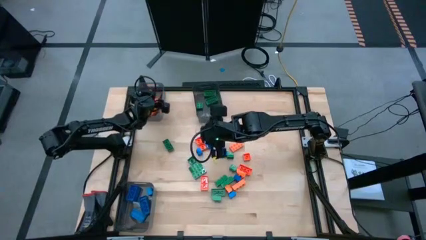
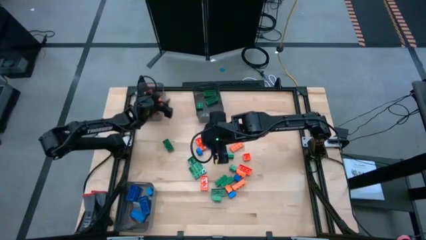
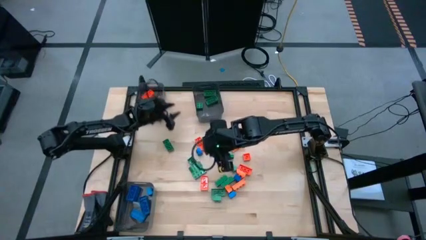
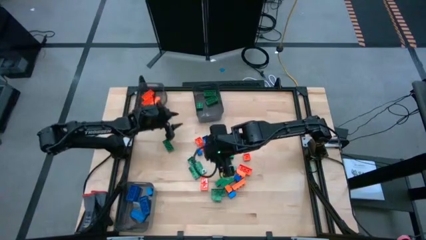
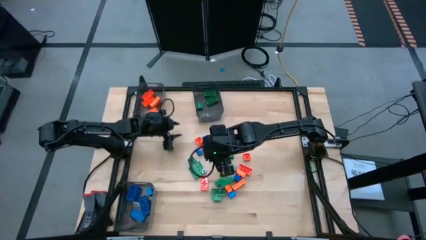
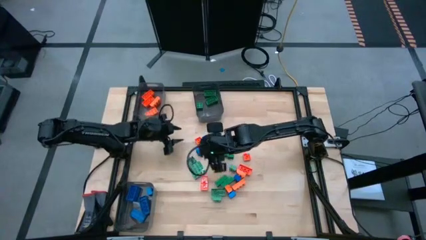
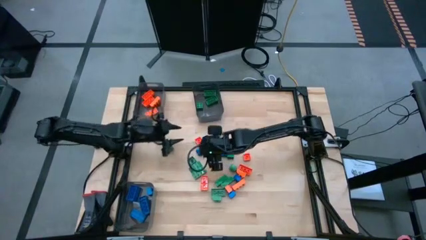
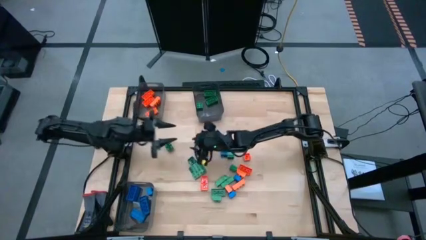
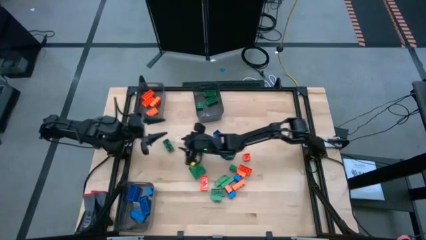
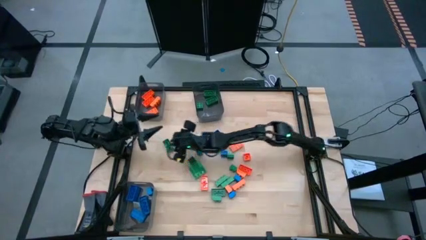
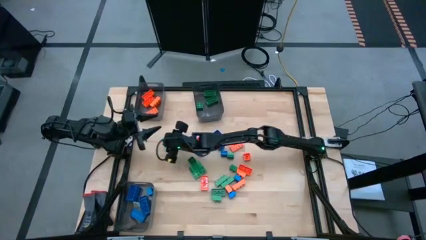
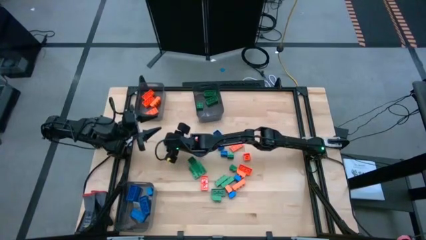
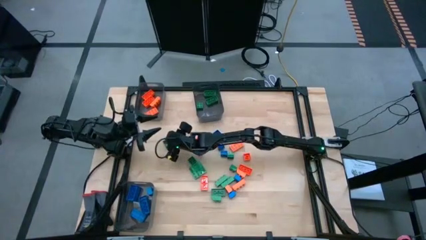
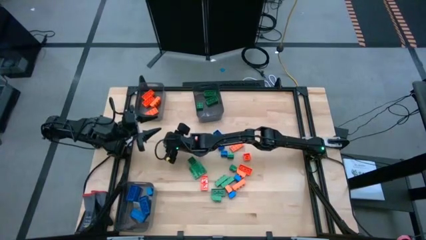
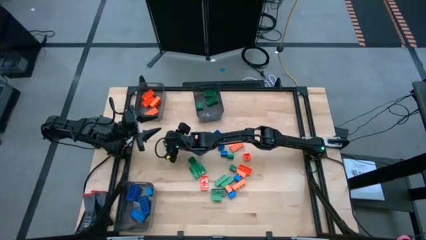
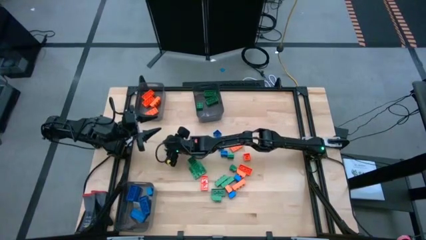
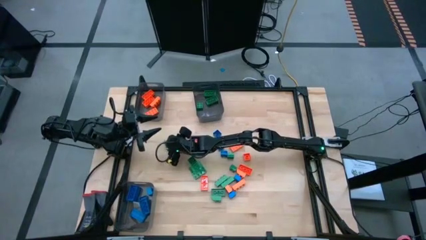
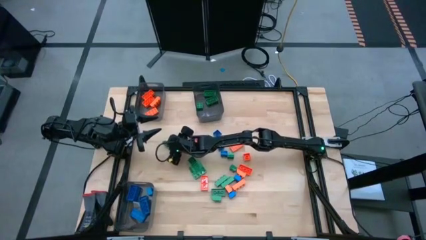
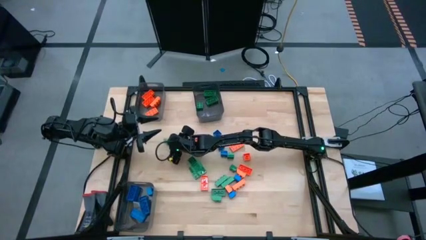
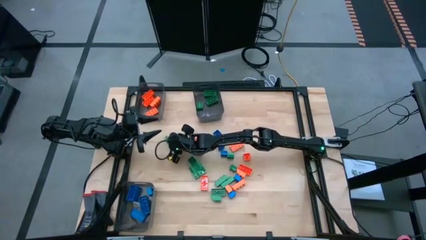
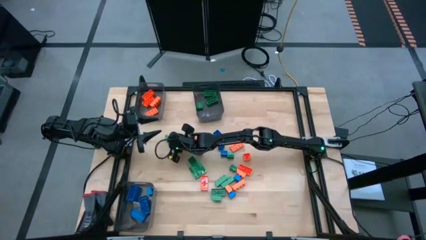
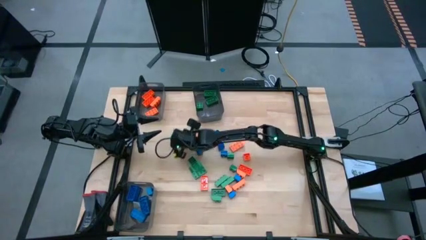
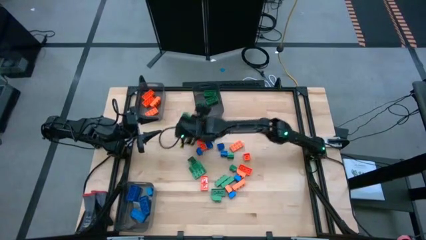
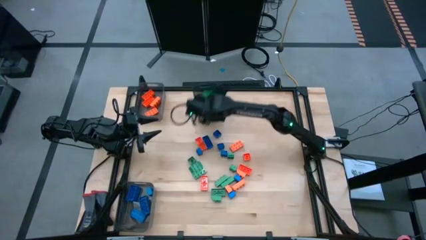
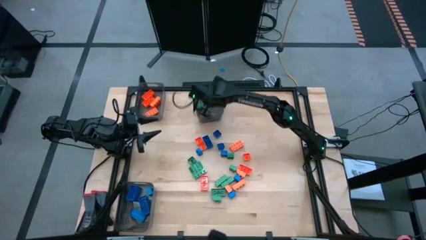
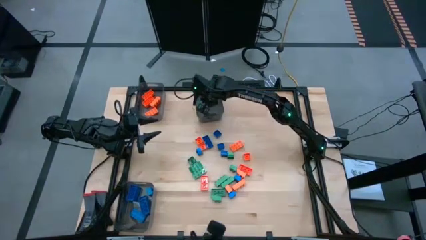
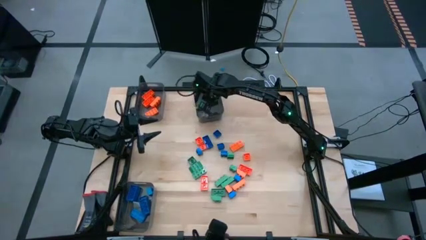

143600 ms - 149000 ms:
Task: Sort blocks
Put the green game piece into the top right black transparent bin

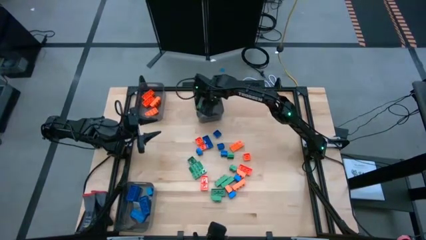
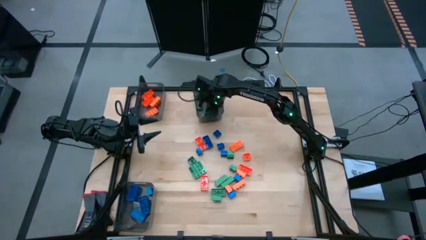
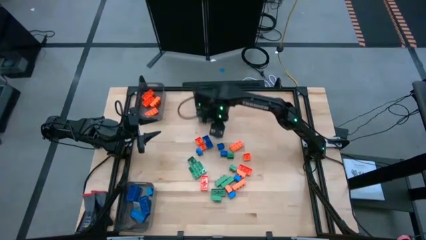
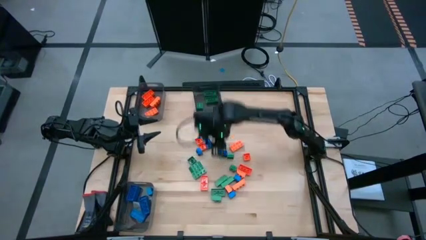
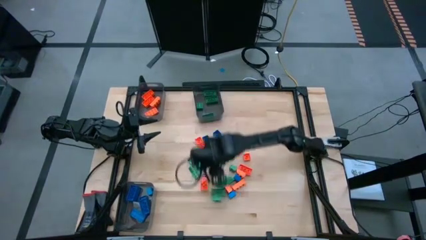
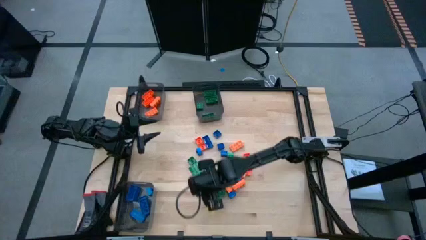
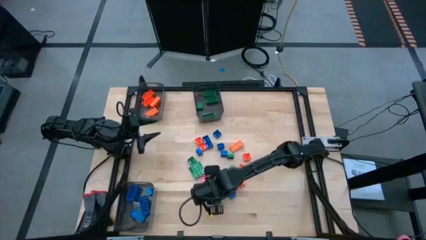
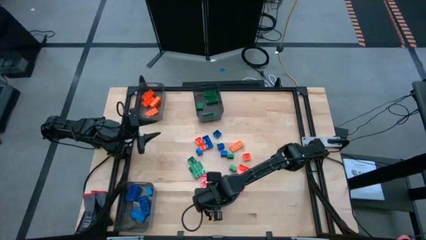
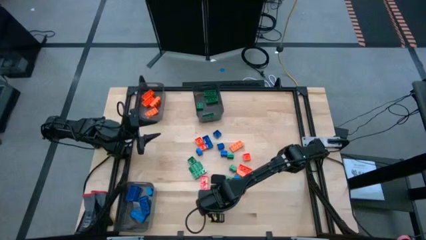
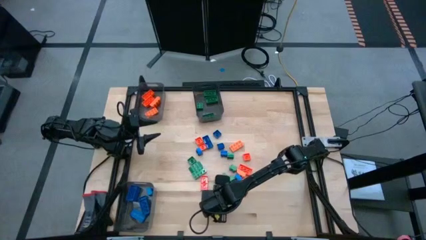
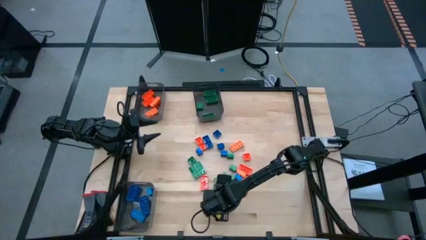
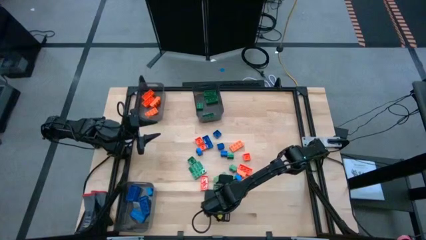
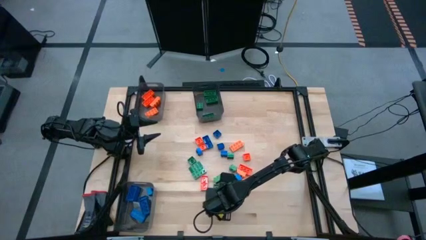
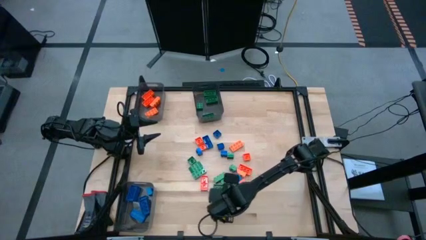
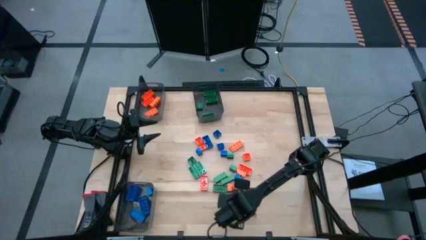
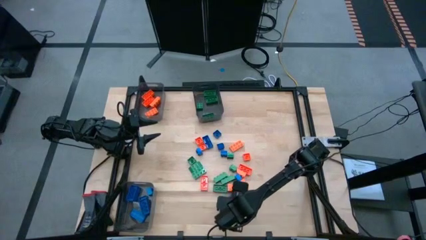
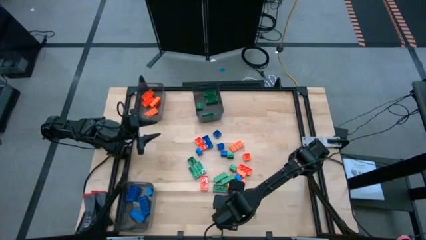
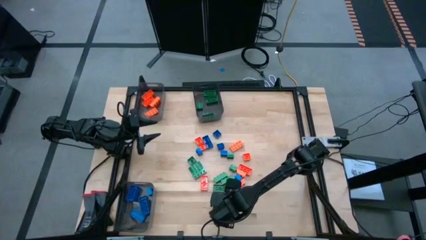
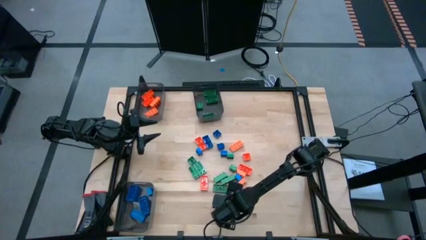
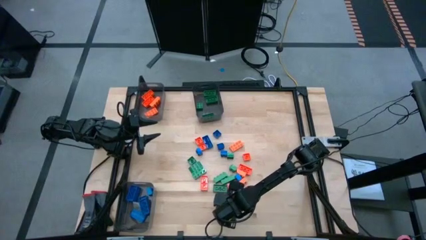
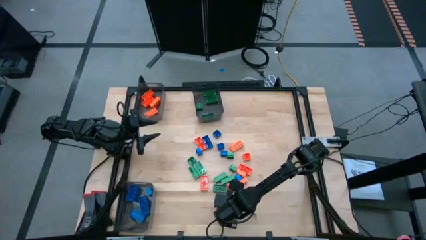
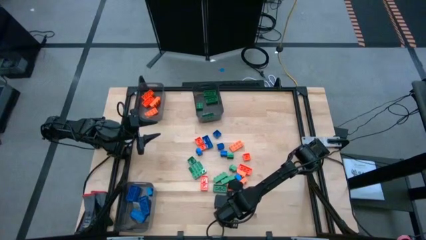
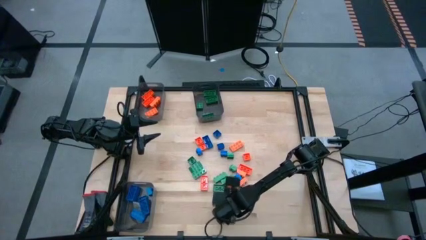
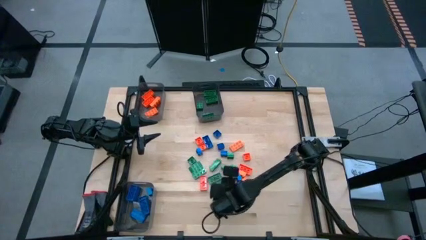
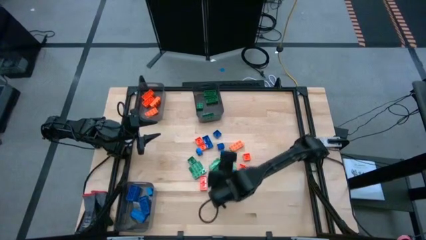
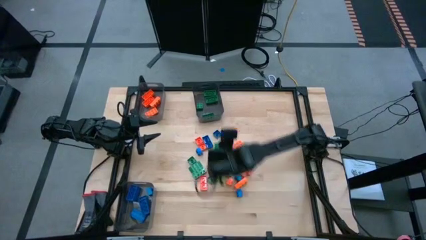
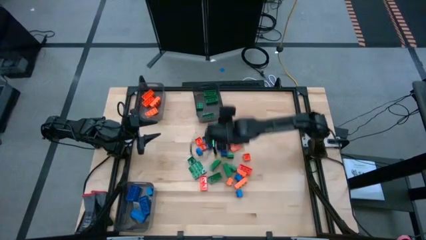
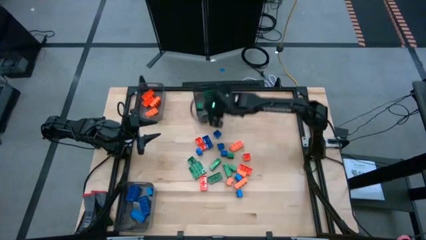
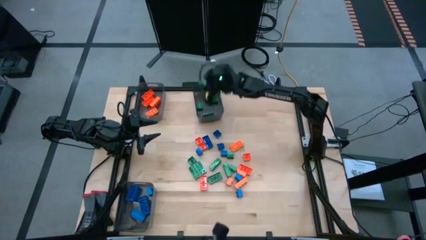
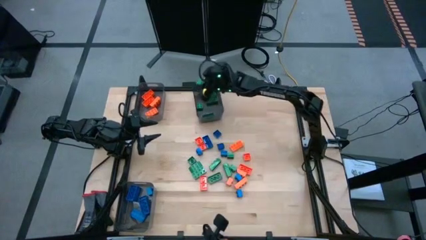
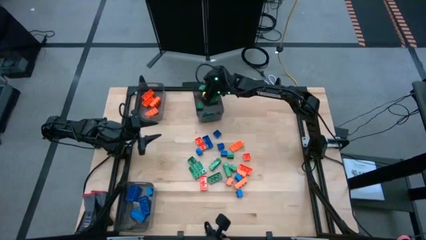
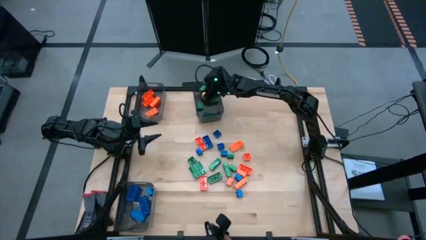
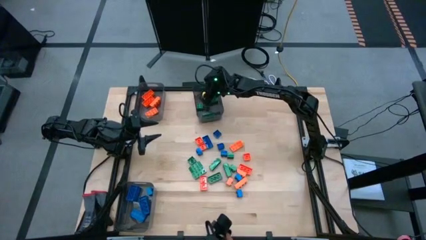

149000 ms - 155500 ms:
Put the green game piece into the top right black transparent bin

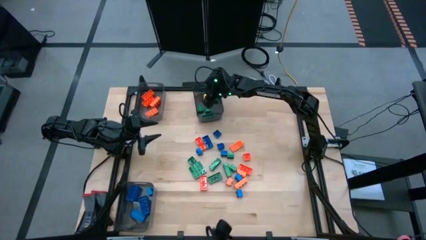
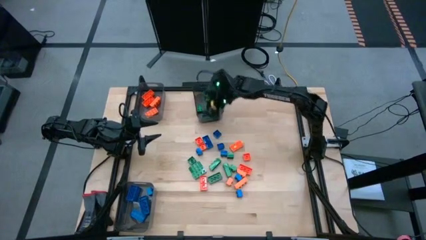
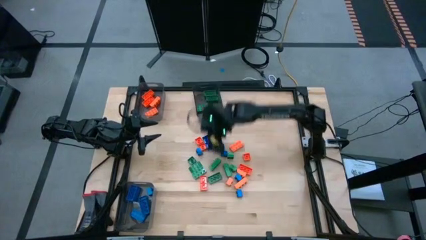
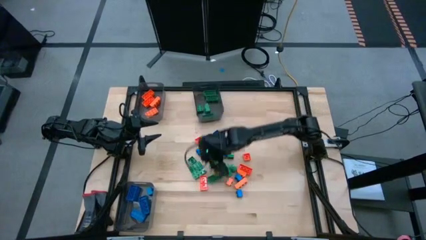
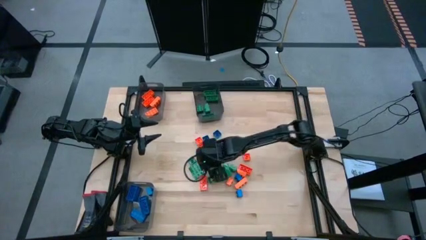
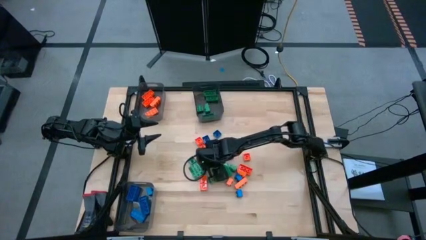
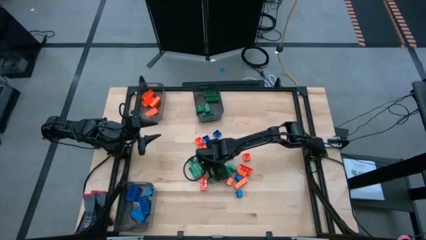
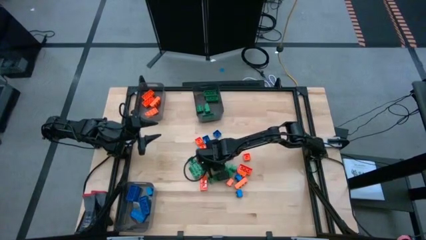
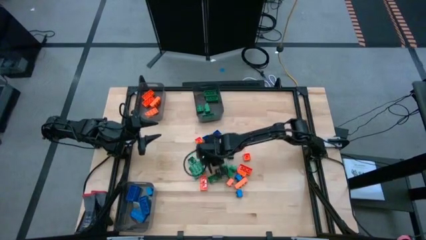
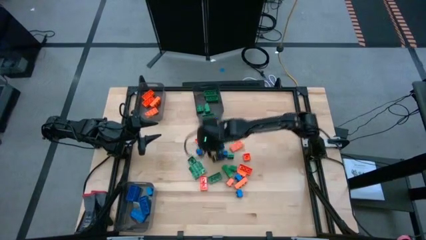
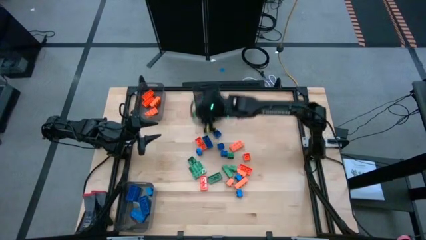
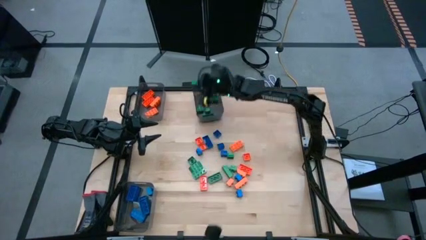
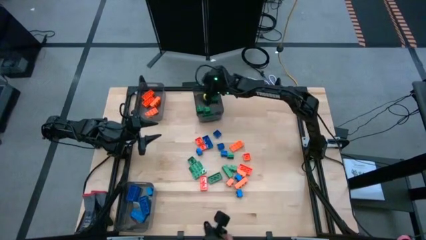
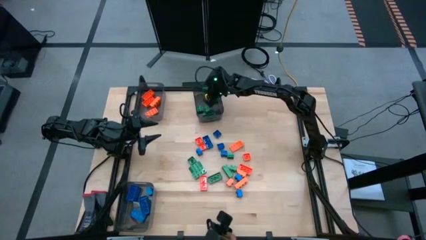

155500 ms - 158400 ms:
Put the green game piece into the top right black transparent bin

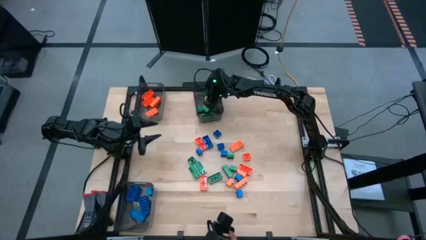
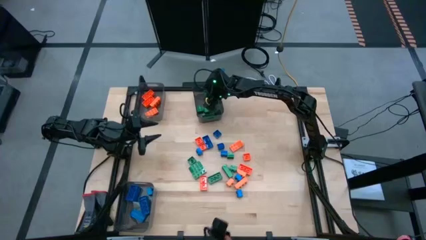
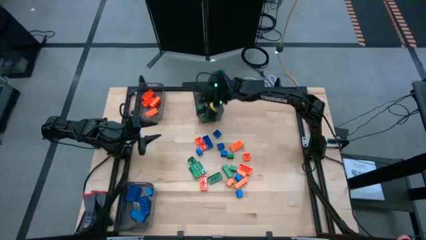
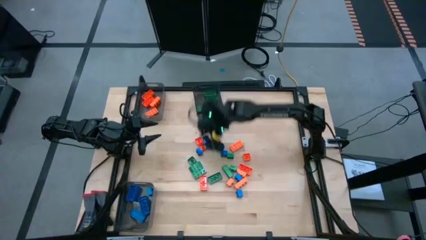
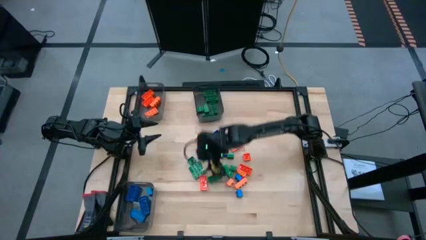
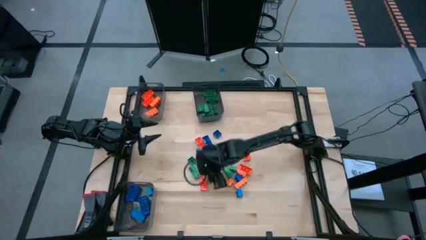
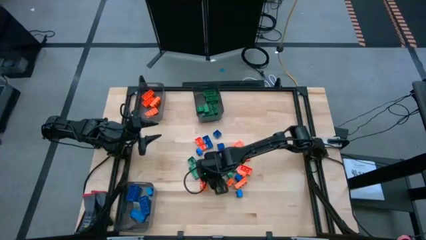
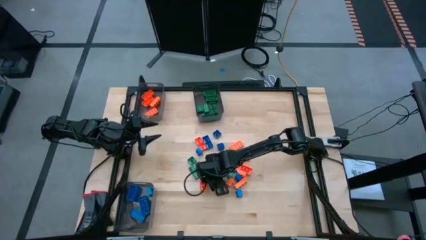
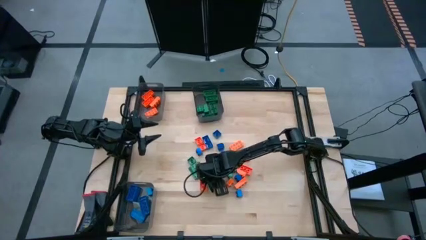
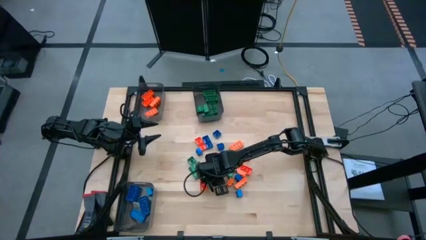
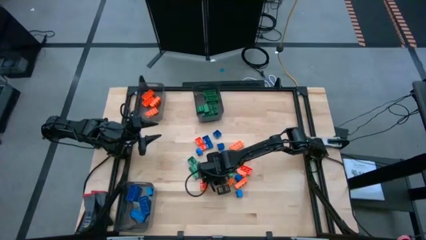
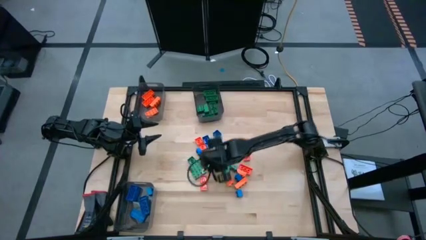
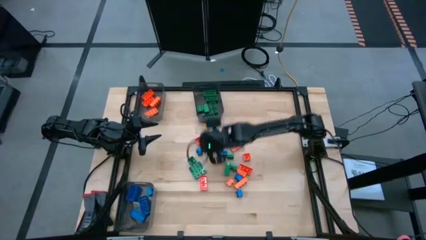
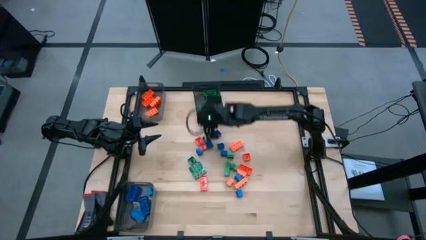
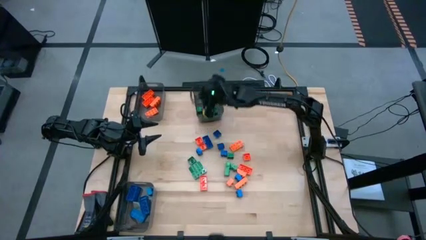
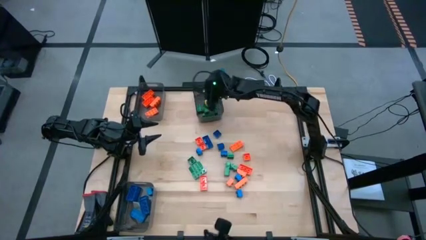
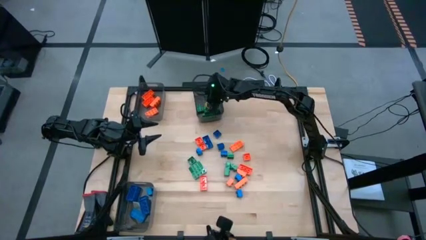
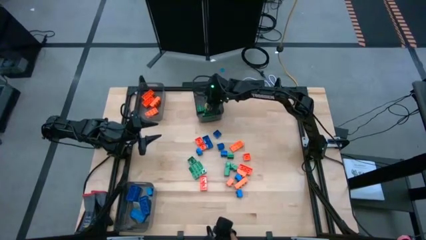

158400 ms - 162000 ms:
Put the green game piece into the top right black transparent bin
